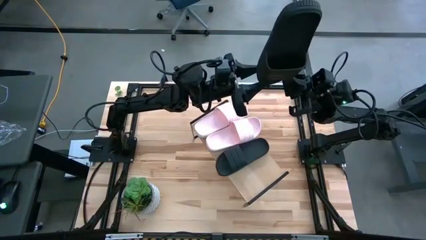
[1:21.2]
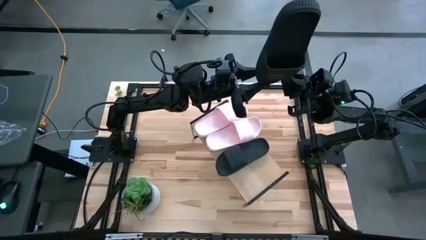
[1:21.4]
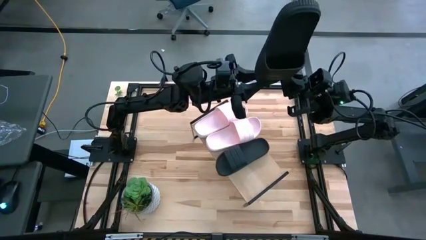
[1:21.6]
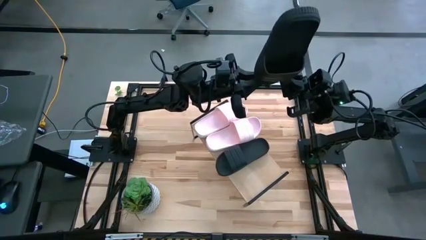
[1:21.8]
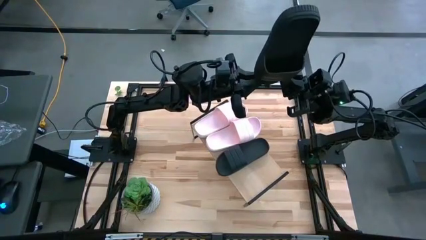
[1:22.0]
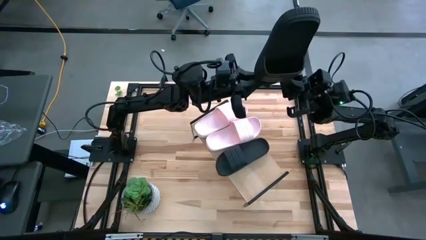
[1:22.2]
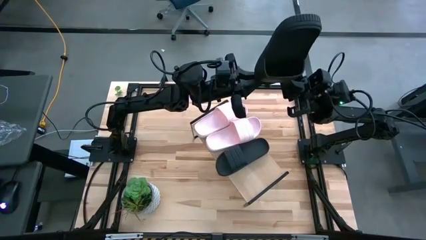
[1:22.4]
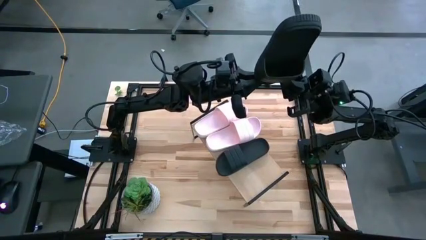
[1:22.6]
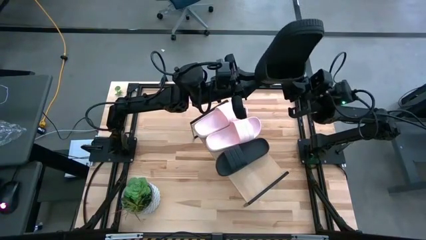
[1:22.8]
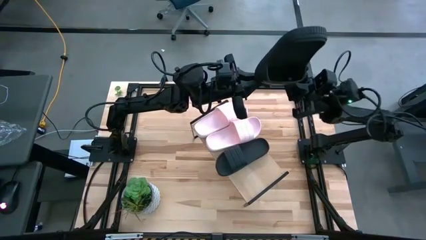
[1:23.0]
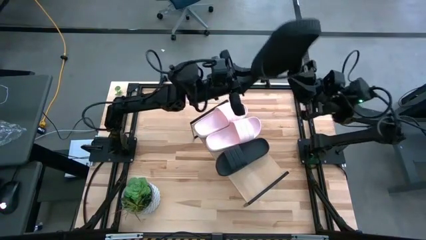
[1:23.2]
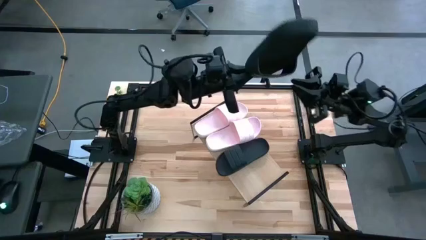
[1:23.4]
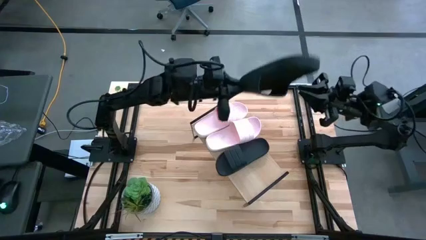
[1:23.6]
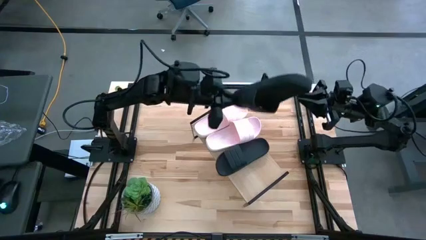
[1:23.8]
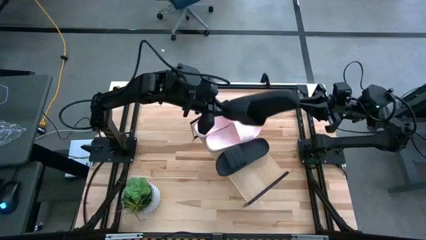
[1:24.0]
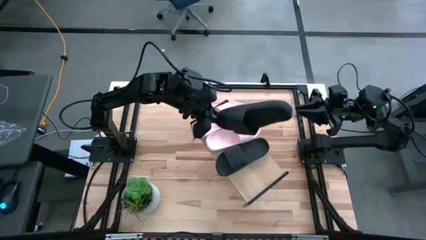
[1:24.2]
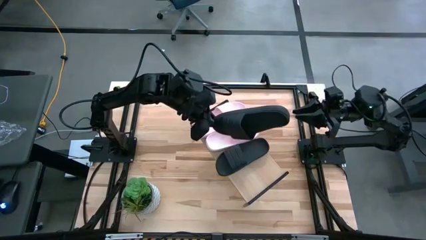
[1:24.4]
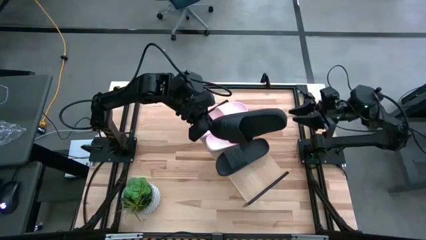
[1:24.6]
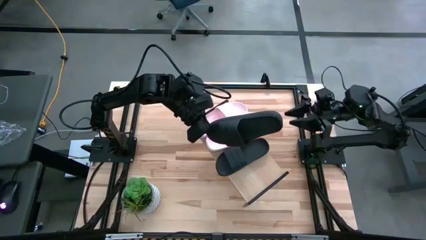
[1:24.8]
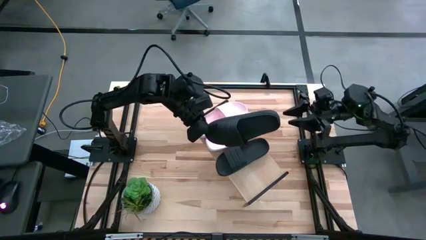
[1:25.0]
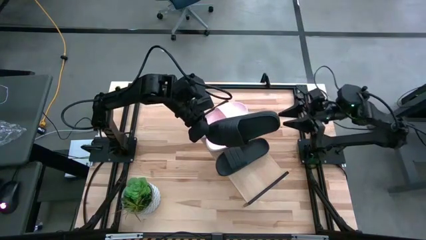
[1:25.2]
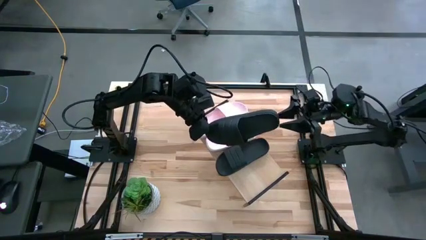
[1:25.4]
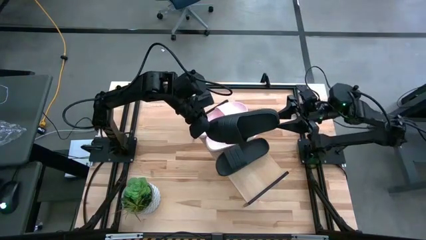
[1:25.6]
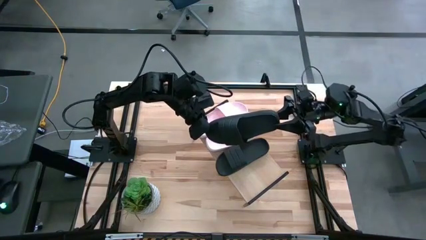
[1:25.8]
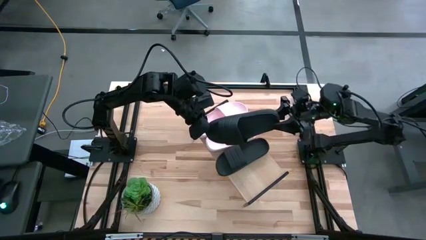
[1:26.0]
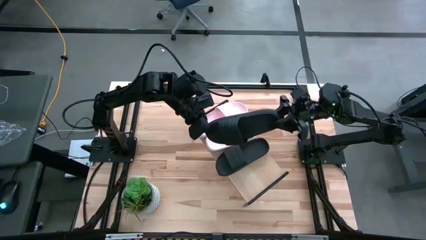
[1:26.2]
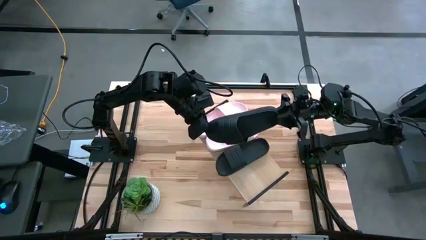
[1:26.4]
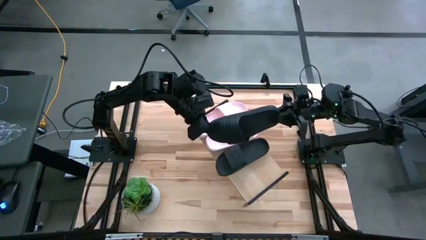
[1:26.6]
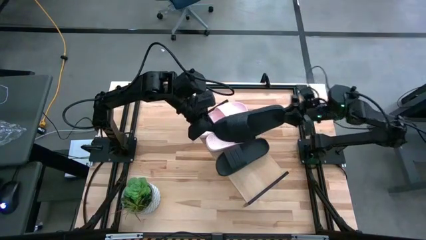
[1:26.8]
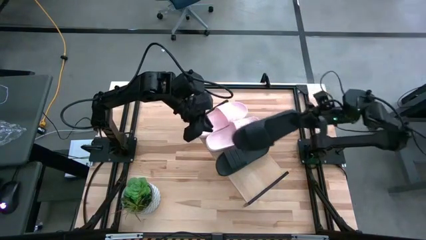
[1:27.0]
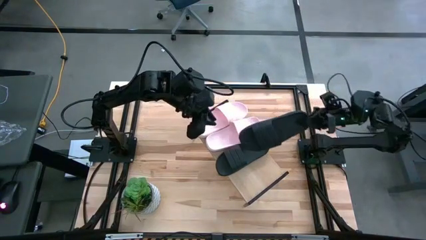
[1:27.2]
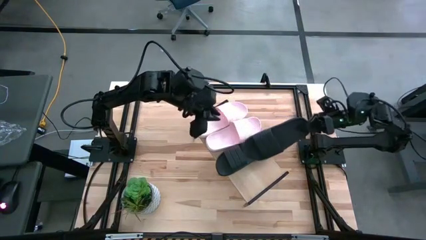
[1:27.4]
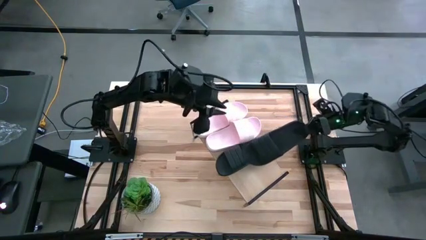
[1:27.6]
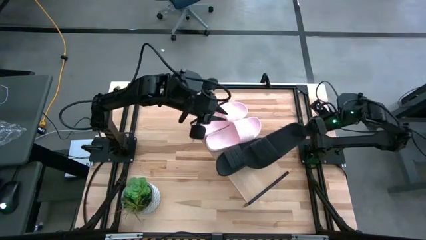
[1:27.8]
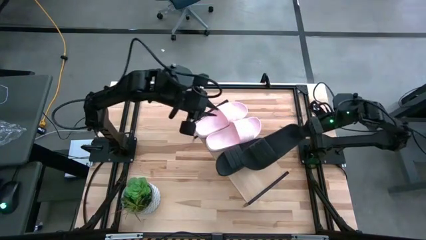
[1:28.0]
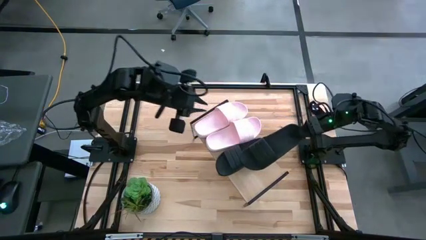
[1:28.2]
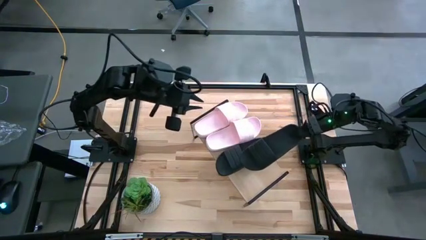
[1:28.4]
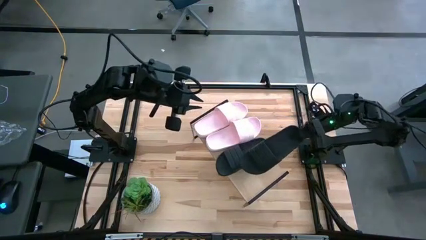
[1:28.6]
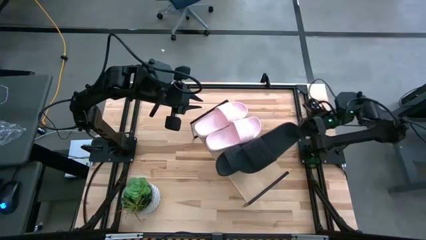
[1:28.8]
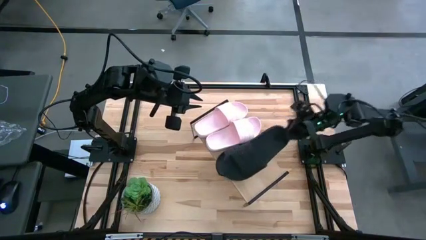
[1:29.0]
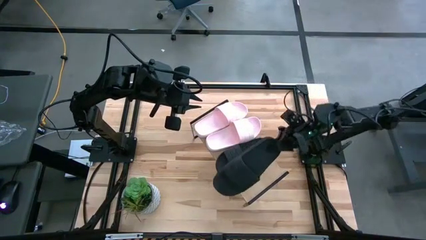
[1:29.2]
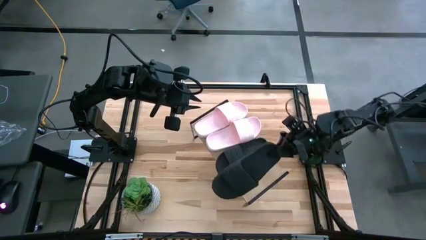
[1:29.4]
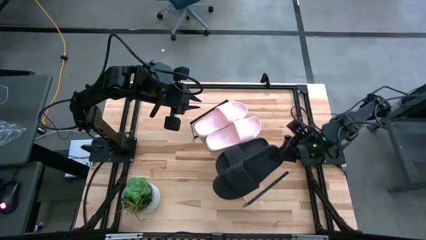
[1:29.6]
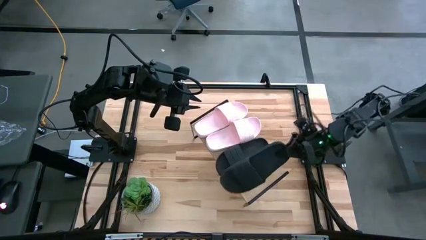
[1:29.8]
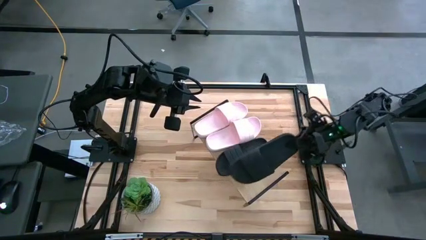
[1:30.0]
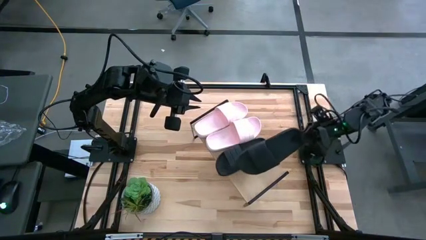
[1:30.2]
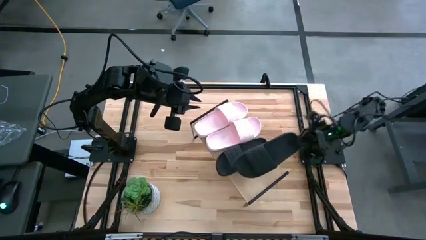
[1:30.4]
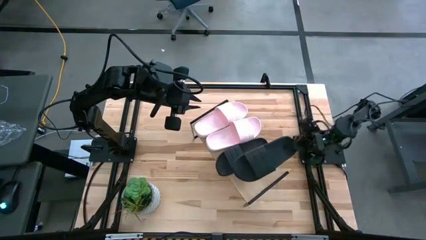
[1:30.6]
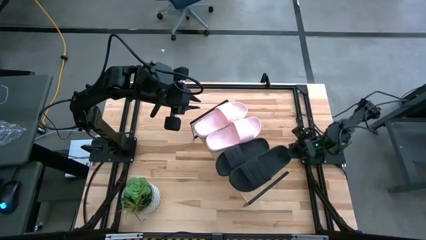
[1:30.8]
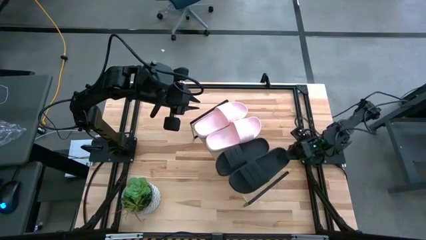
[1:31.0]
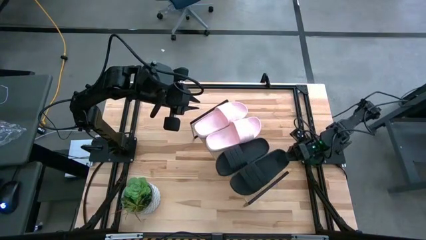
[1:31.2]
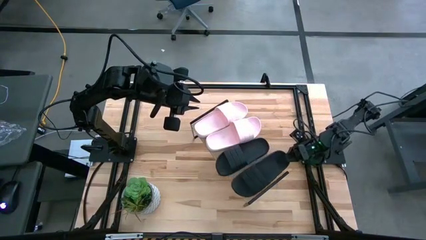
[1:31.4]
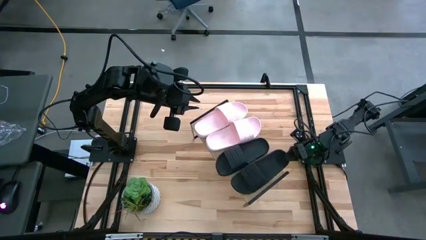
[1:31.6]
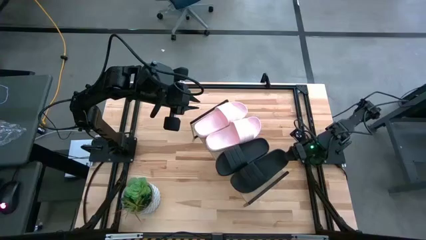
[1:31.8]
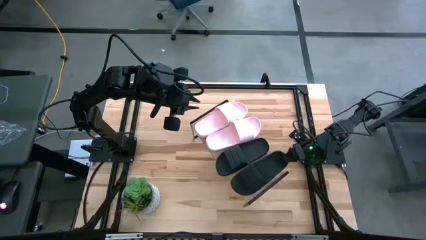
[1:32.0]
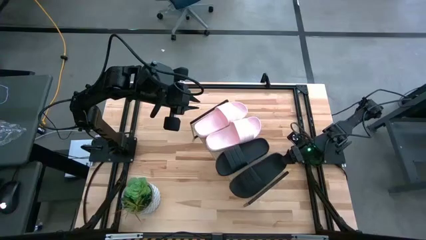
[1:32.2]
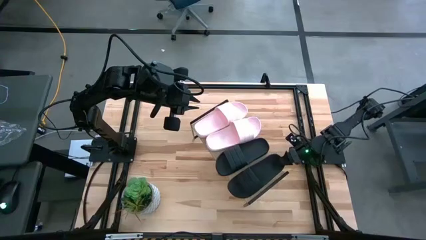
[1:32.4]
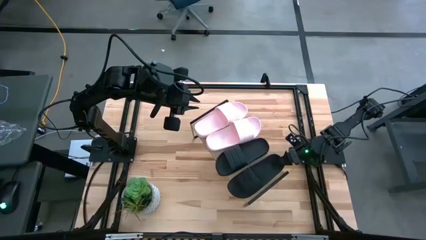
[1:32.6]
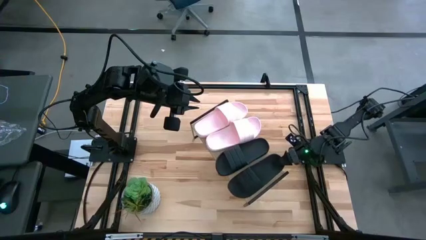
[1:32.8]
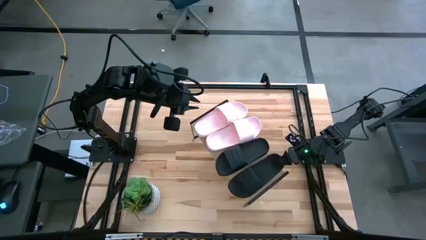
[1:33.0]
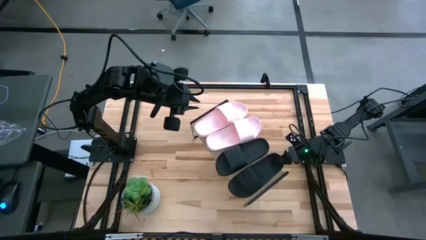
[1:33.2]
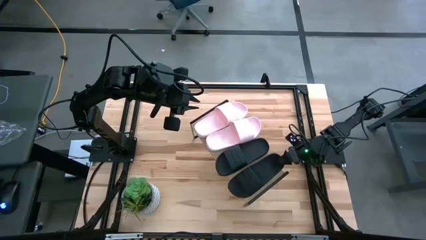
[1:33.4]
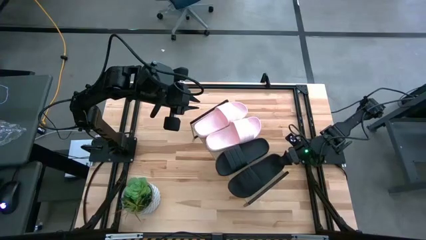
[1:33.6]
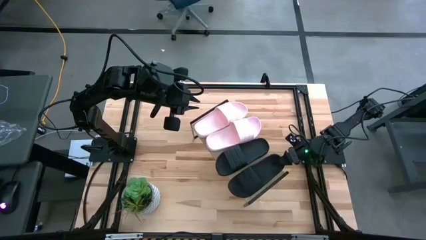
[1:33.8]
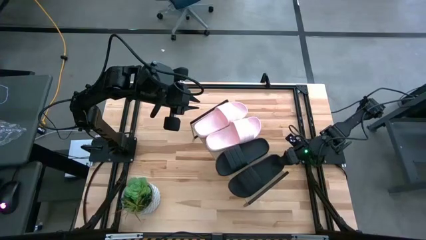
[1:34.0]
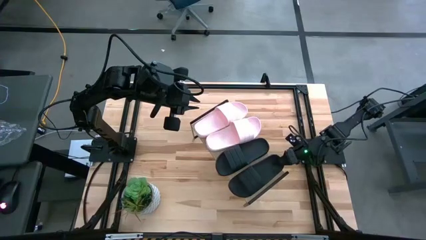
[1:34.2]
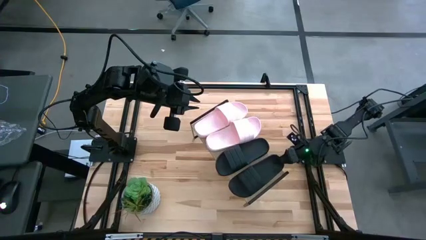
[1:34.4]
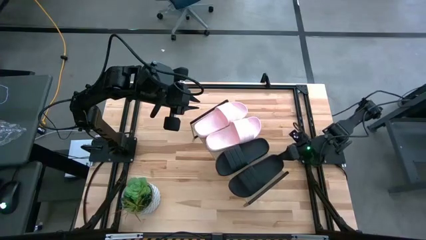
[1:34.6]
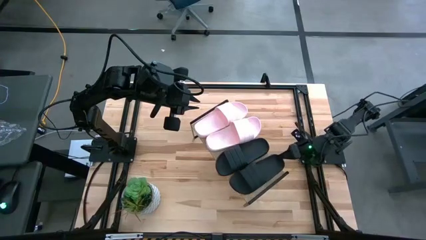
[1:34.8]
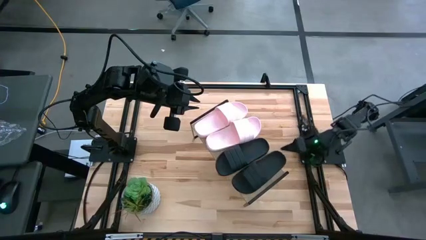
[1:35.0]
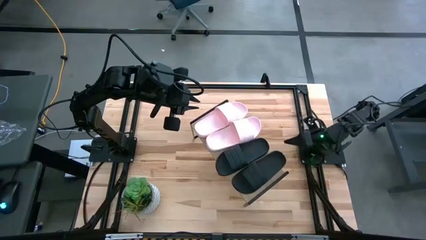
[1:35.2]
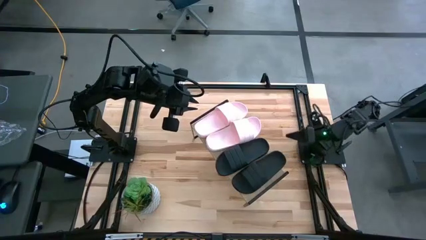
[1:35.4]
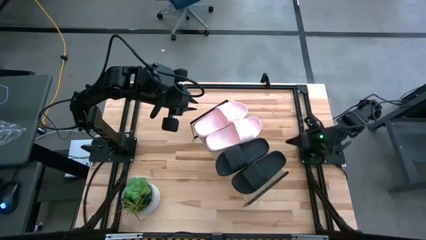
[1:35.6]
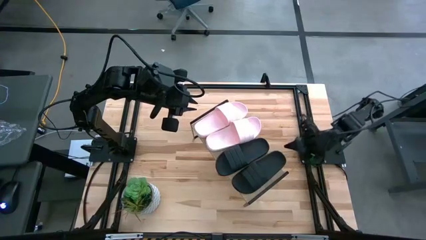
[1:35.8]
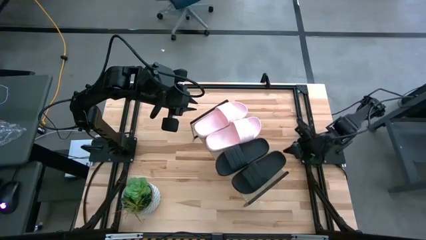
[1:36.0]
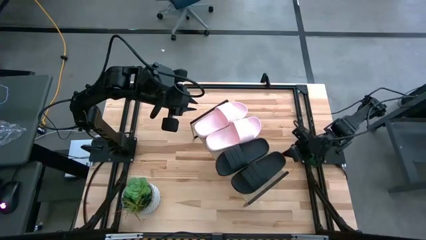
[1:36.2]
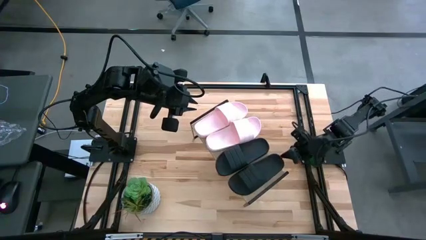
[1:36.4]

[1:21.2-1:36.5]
Task: Pick and place slides into the shelf
Put the black slide on the shelf
